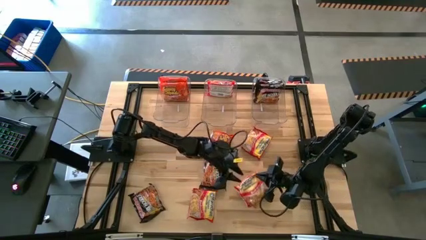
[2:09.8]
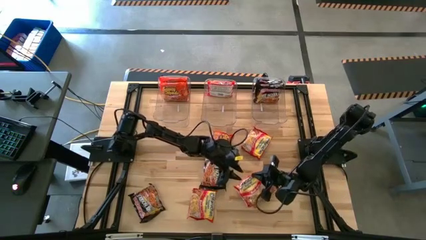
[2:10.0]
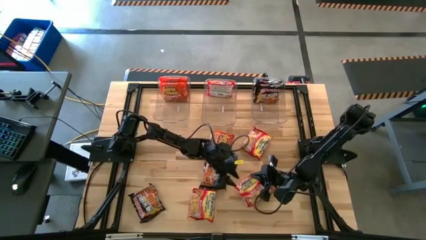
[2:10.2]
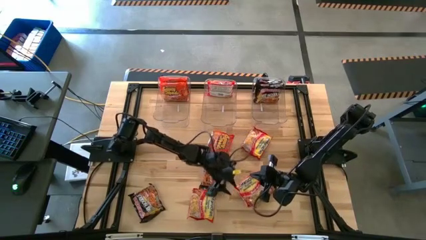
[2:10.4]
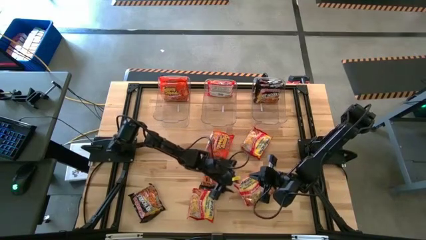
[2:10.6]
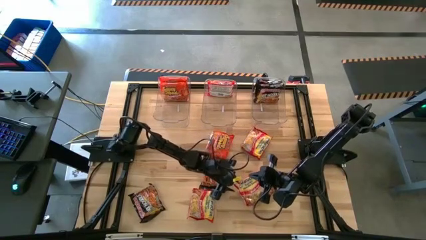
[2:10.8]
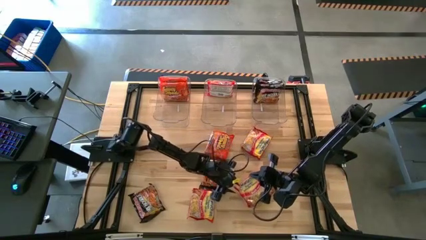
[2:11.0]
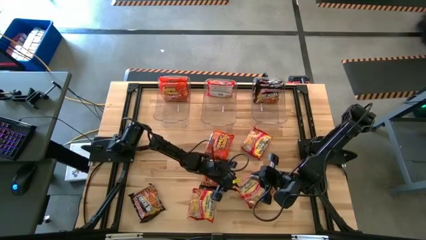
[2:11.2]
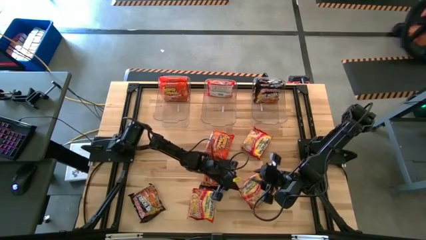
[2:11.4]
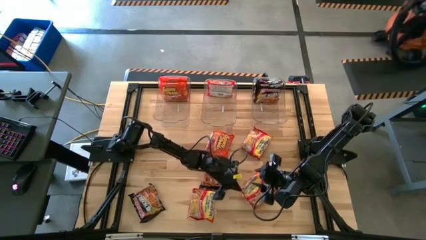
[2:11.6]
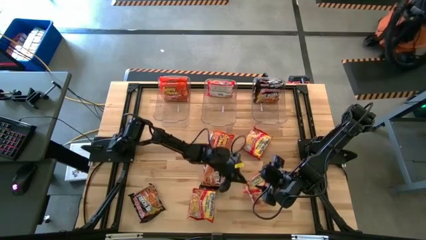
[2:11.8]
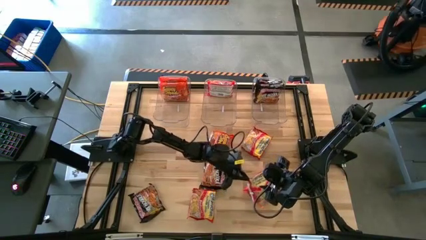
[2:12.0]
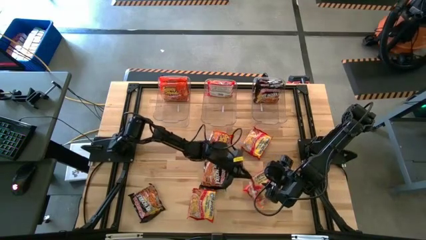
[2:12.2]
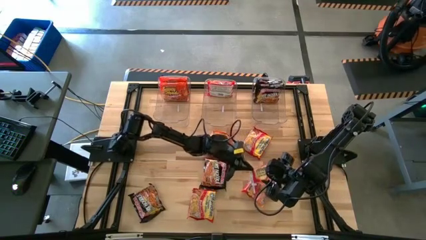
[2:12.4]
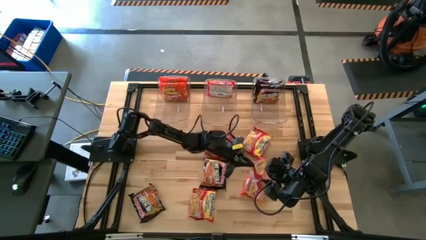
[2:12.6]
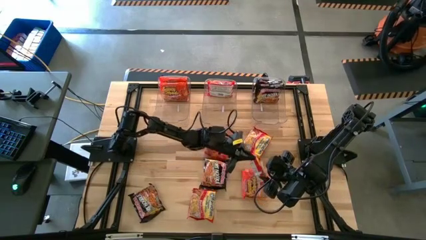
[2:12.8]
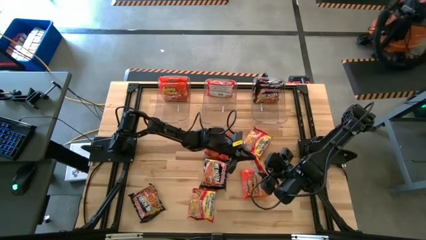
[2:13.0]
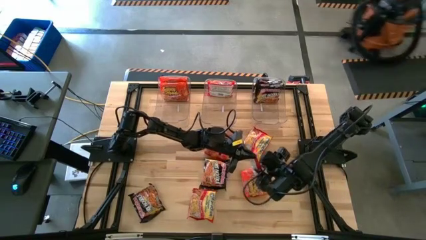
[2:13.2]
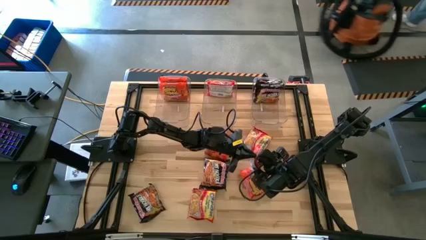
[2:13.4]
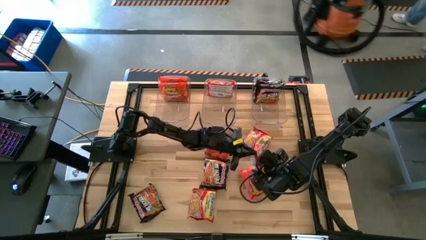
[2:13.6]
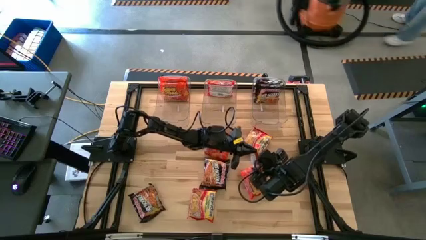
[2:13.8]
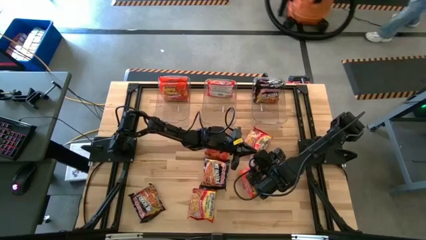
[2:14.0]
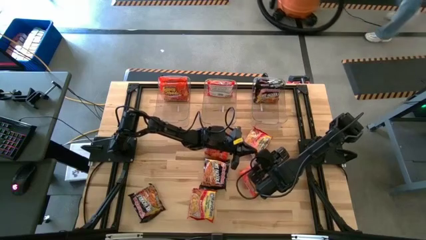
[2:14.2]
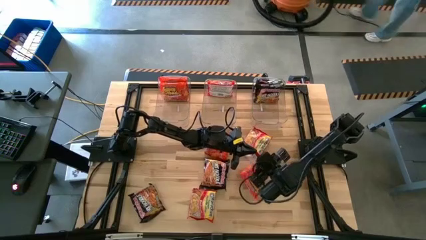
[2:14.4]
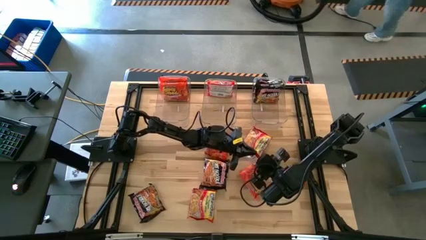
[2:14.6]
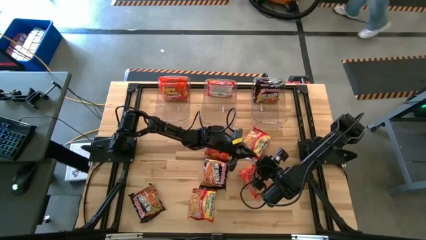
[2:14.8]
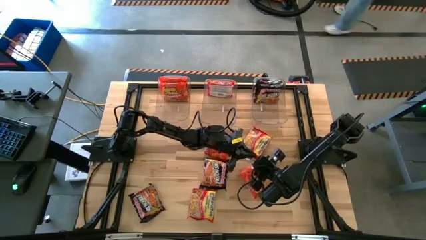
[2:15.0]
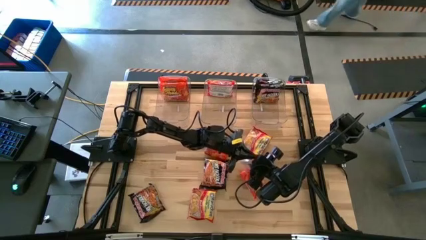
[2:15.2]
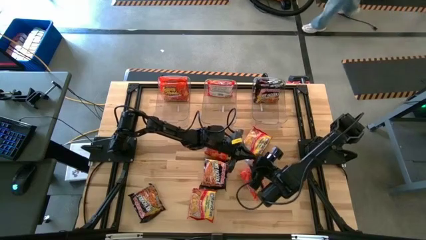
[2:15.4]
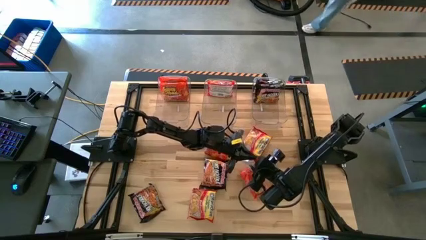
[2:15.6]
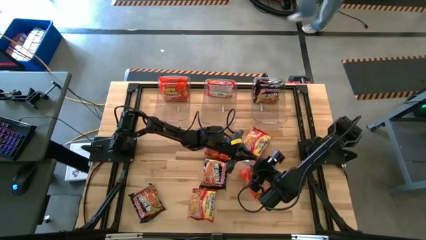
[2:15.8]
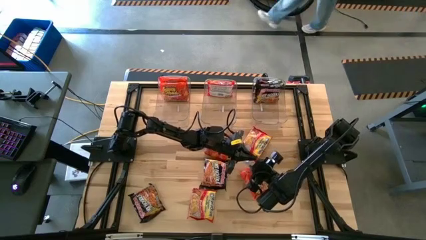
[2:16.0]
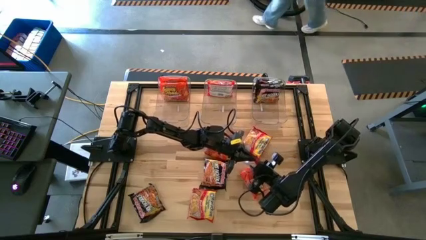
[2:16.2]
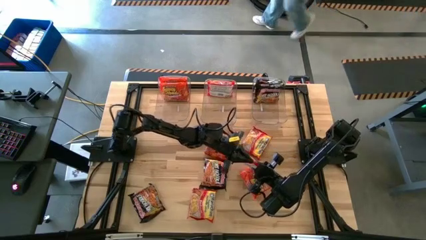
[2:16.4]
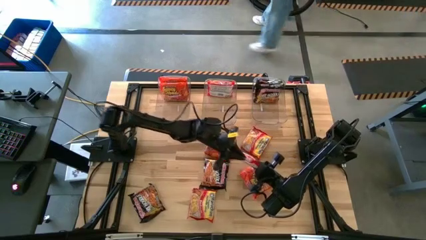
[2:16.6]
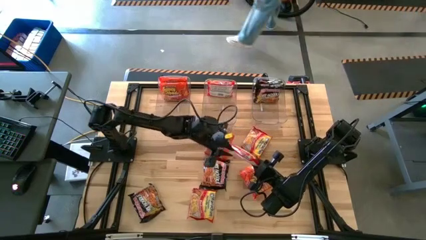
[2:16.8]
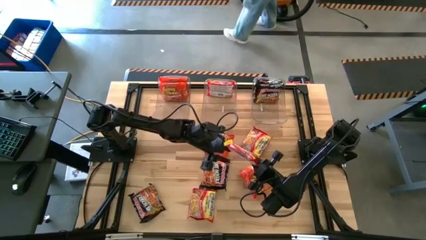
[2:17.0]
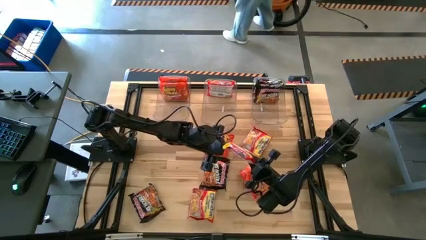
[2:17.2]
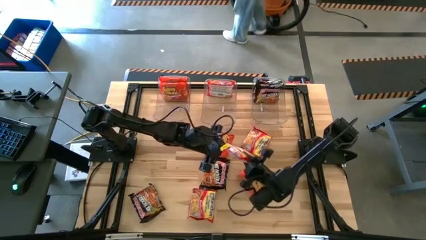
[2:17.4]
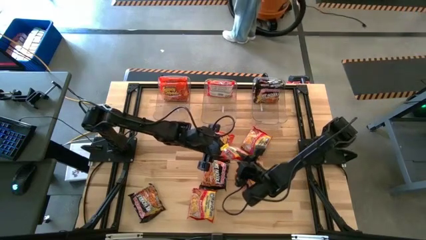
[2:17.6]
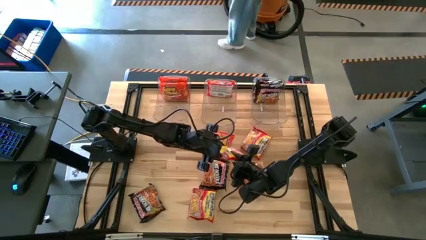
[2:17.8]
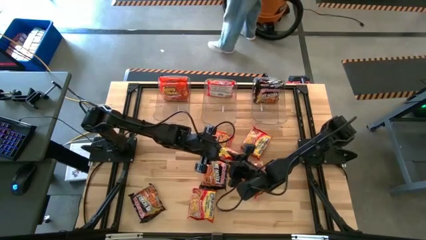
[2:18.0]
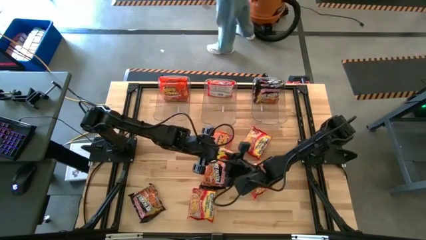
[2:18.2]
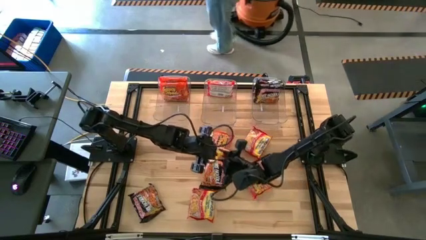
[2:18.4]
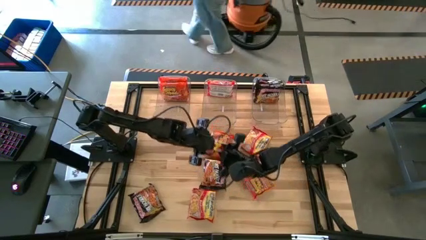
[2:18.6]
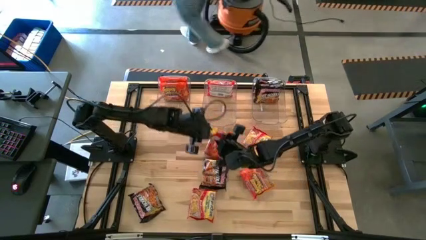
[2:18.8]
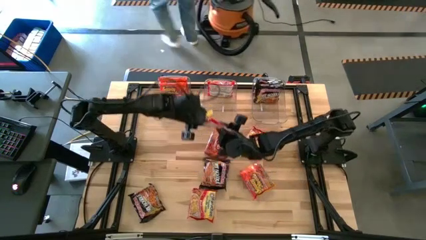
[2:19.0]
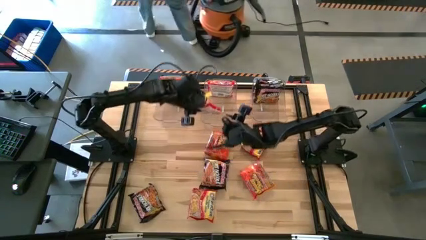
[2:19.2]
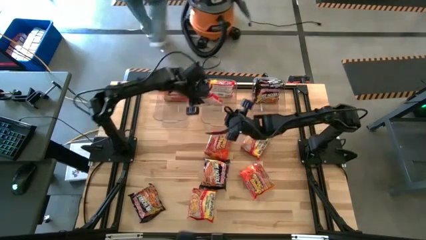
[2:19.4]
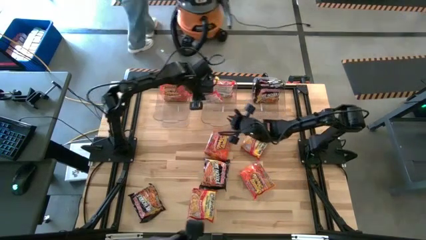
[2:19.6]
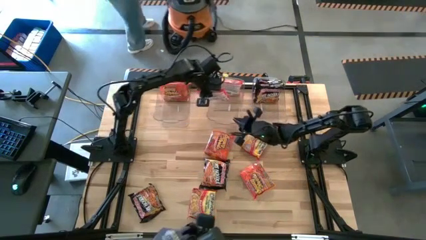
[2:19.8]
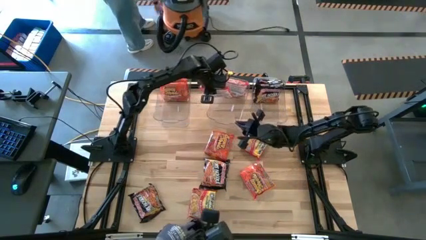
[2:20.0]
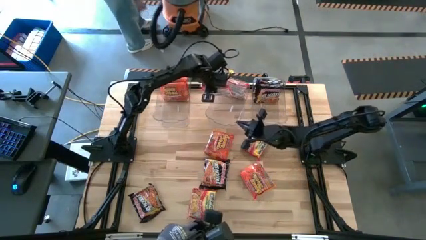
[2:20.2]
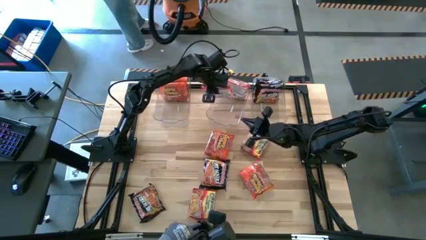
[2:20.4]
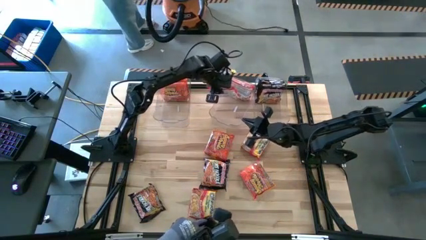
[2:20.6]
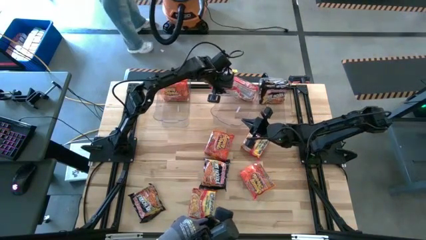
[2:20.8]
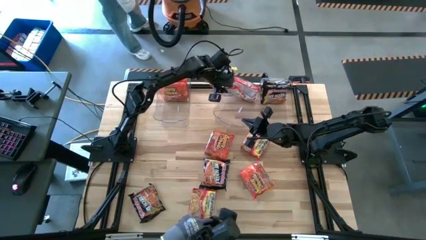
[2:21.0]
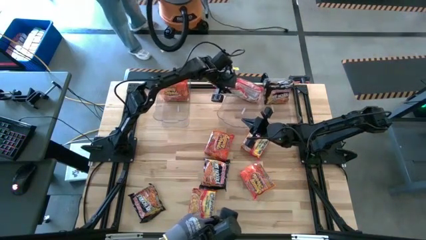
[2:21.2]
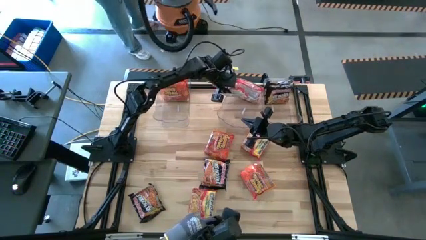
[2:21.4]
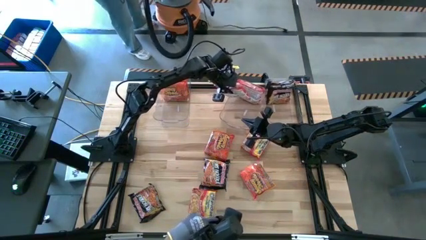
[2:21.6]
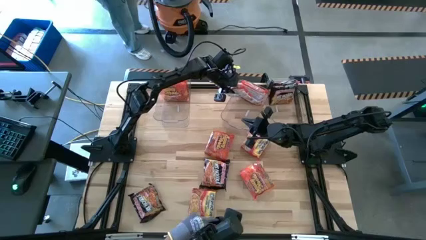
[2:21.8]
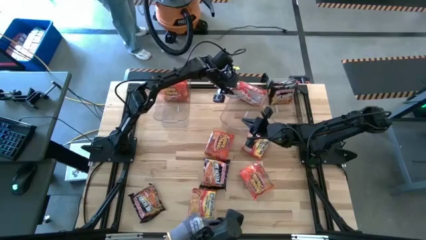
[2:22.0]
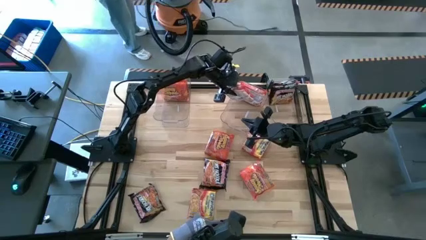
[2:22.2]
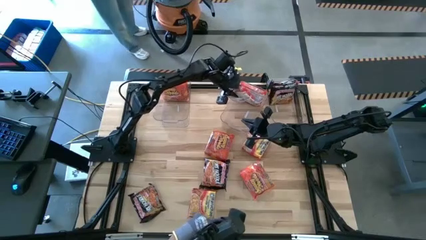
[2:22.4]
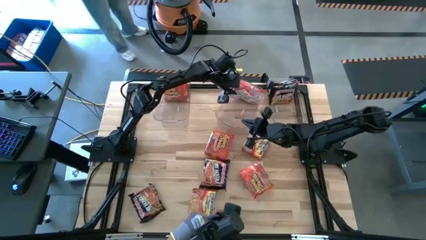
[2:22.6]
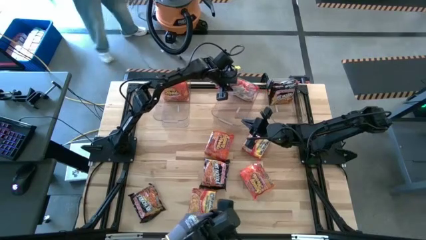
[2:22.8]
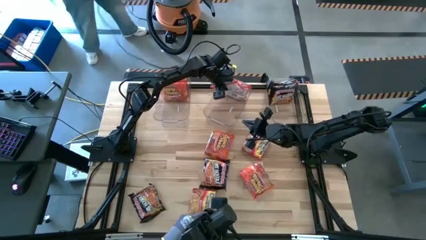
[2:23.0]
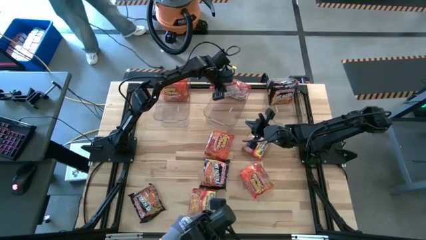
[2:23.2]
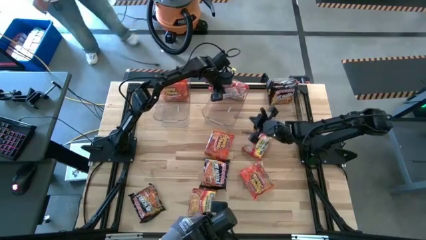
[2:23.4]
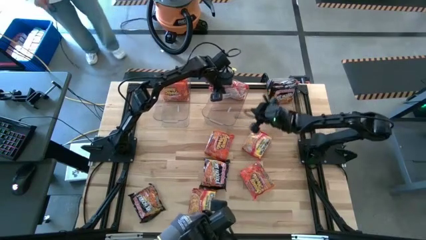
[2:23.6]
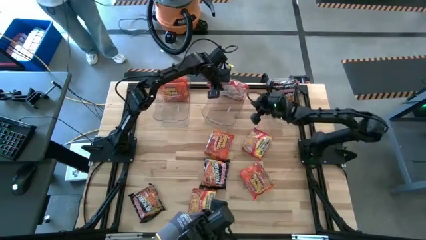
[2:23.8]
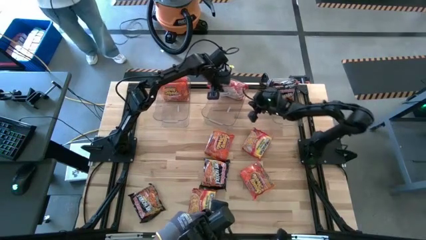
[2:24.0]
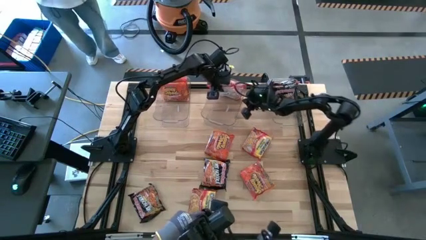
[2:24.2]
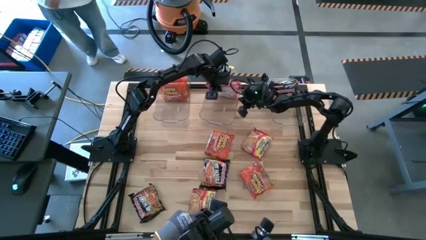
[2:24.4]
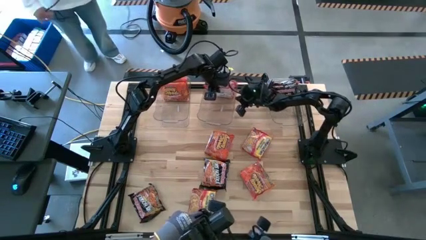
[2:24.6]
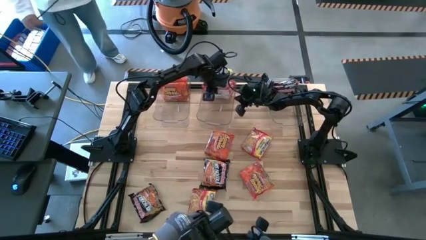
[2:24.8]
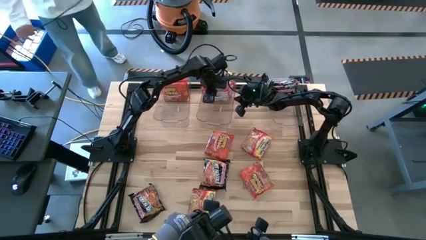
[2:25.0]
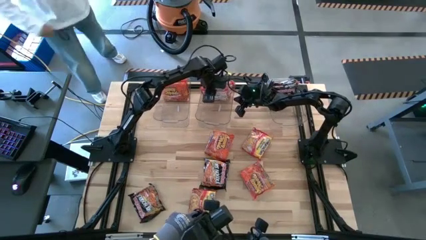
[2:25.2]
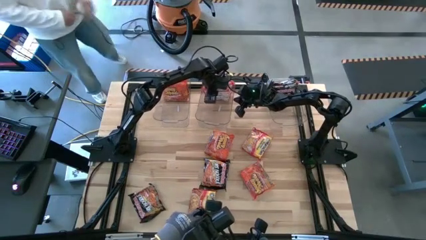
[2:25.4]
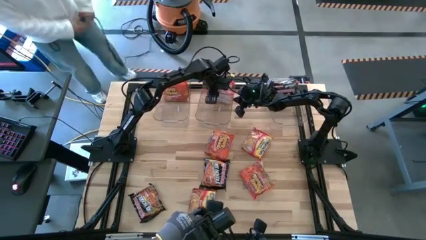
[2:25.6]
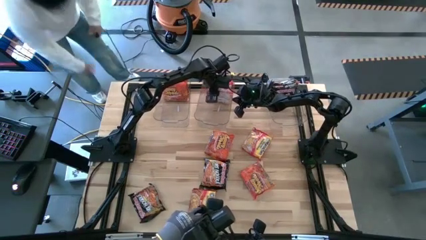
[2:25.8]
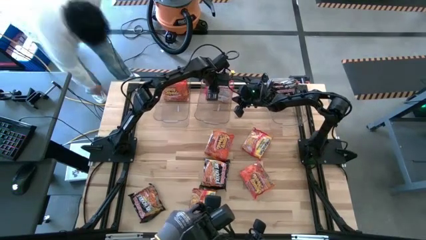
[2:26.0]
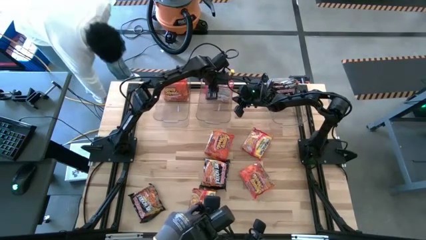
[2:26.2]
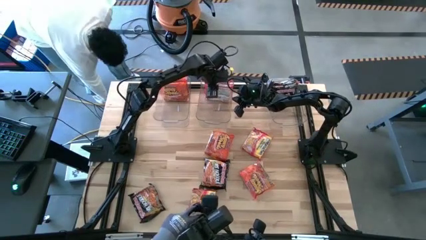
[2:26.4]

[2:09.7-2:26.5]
Task: Sort Maruchan noodles
Put the red noodle pack into the middle transparent bin
